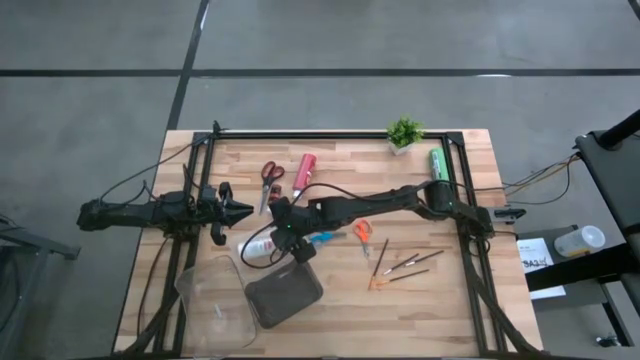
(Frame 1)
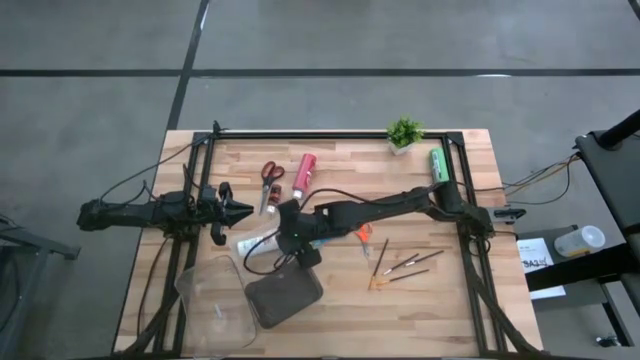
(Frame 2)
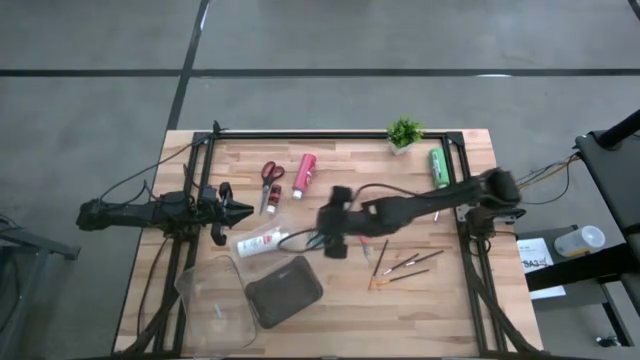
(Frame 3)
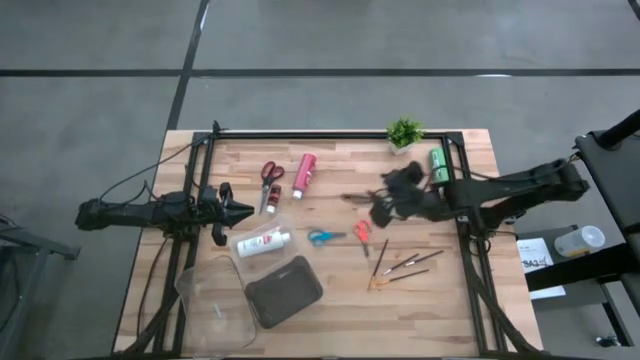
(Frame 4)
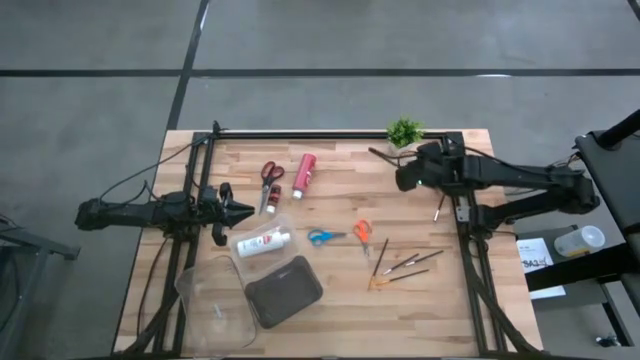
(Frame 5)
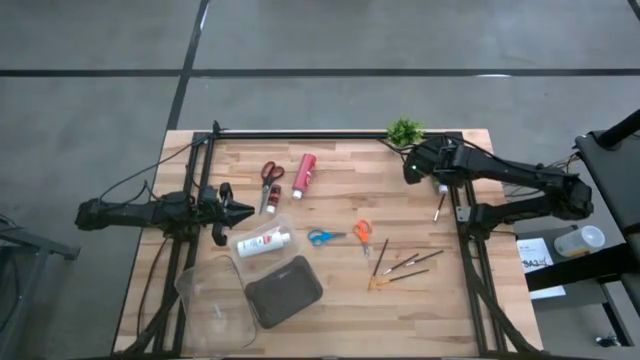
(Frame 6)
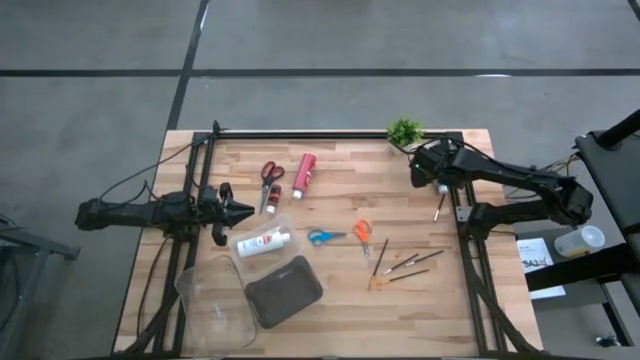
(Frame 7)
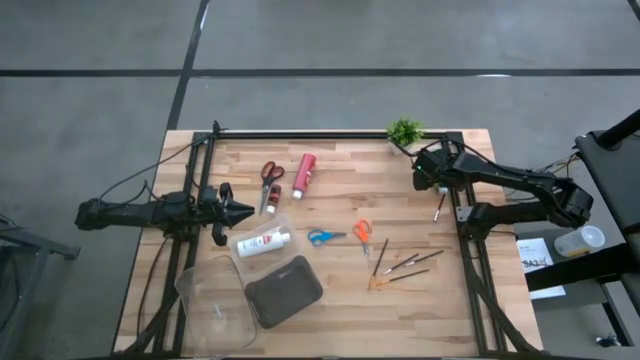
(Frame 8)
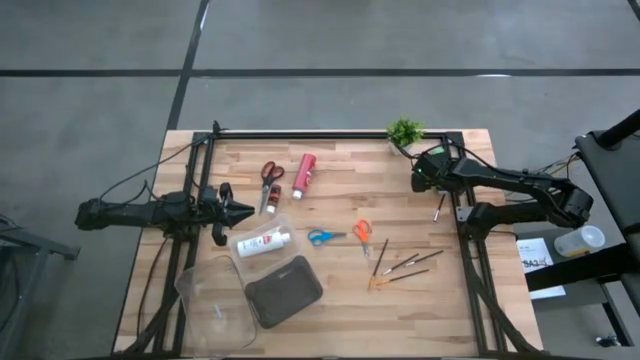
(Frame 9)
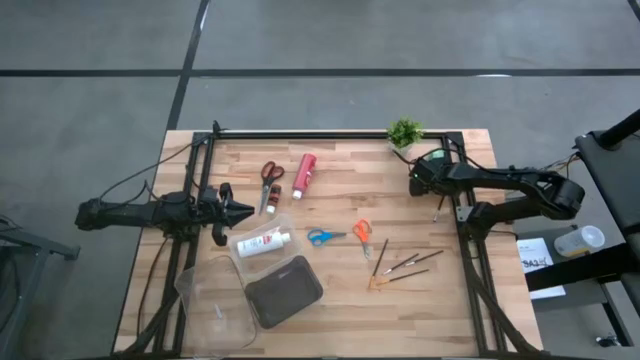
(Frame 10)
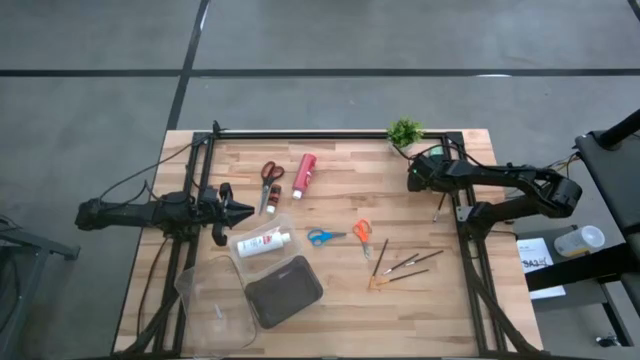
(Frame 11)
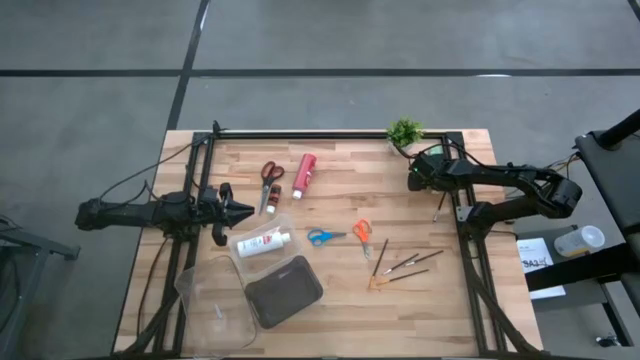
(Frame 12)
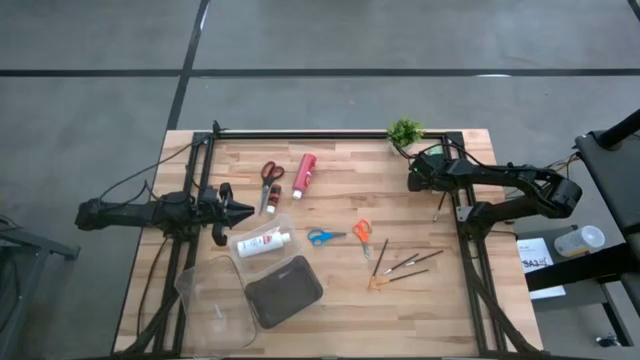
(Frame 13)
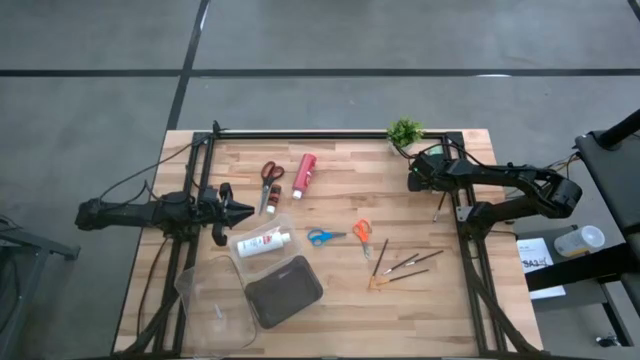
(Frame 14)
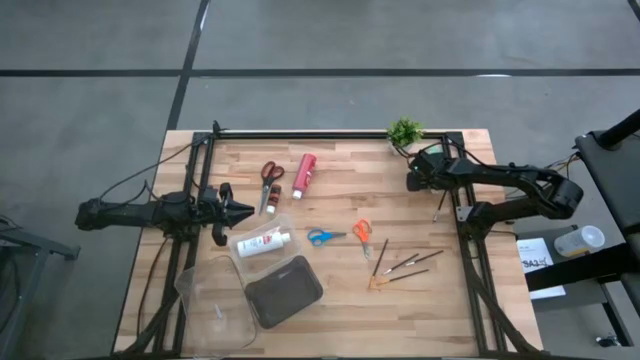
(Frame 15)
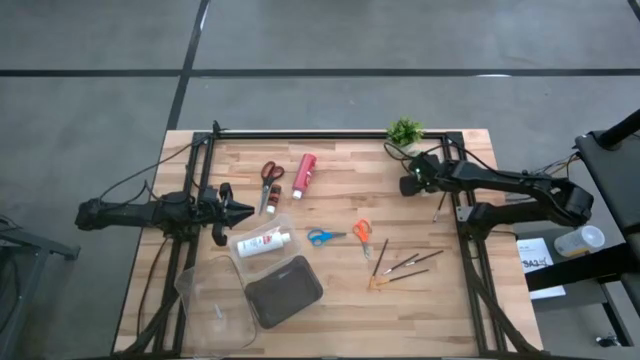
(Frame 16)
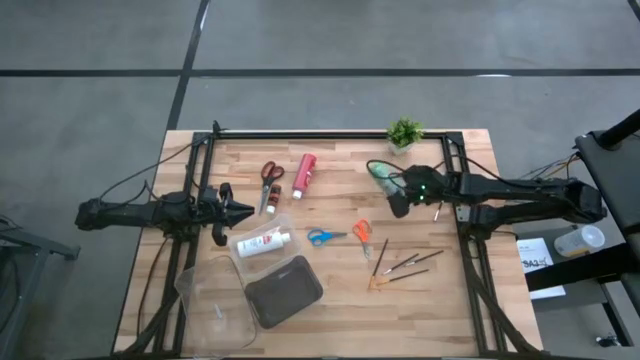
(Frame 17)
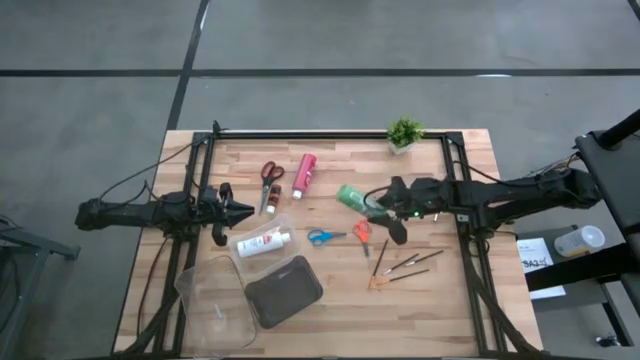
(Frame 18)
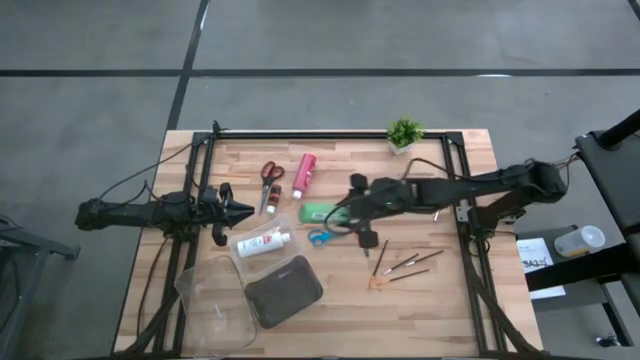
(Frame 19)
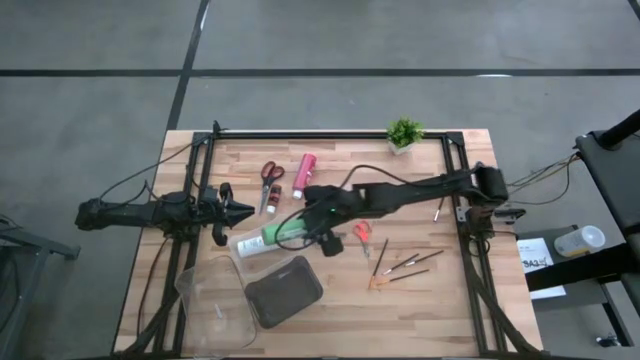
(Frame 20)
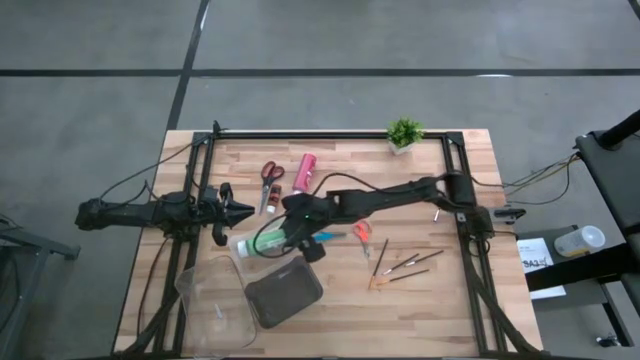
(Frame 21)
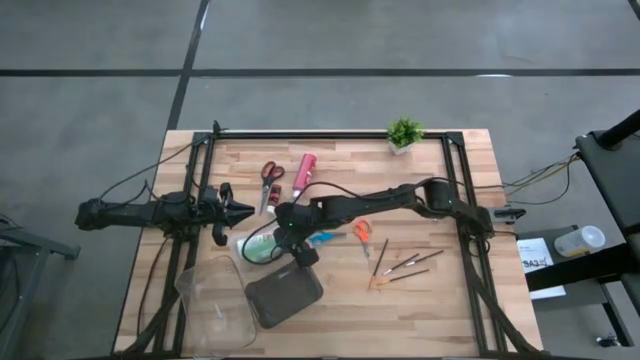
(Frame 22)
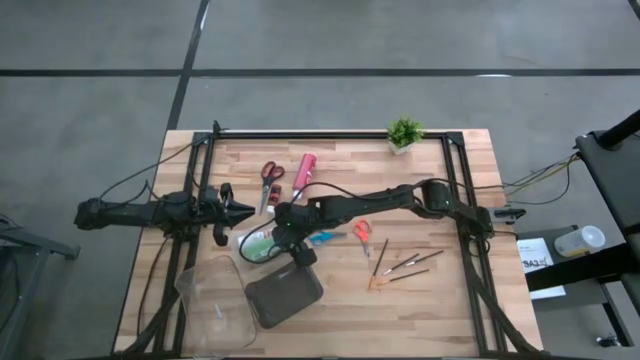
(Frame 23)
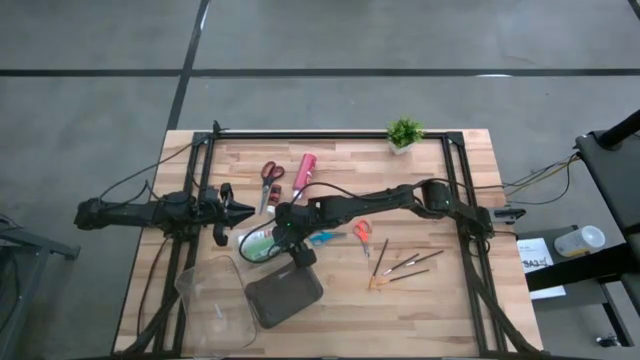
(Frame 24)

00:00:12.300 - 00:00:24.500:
Task: Pick & Place Paint Supplies
Put the green paint bottle into the top transparent bin

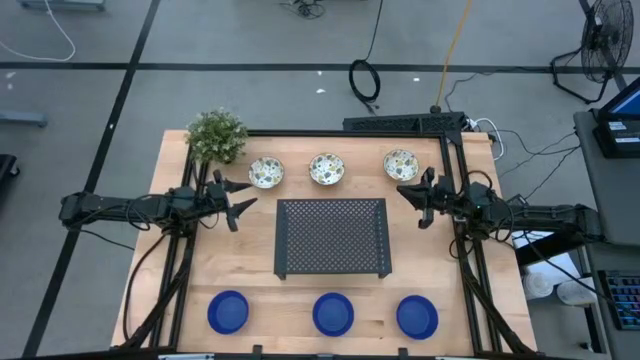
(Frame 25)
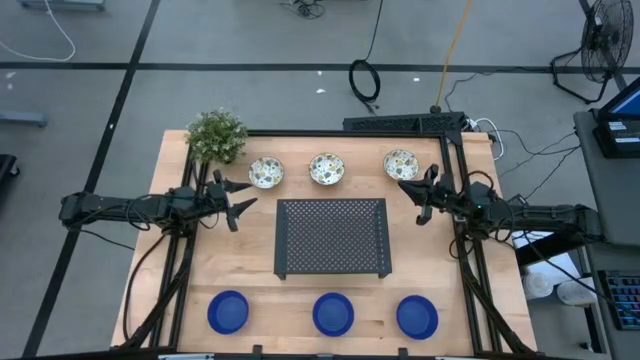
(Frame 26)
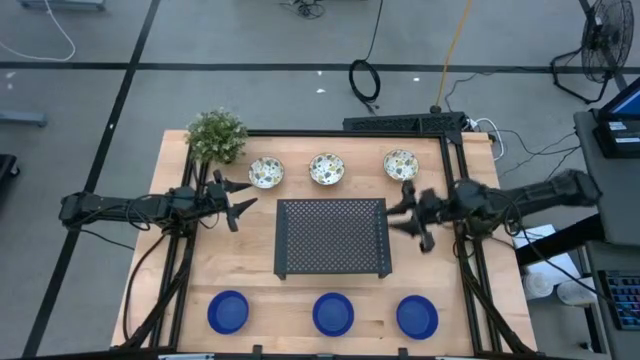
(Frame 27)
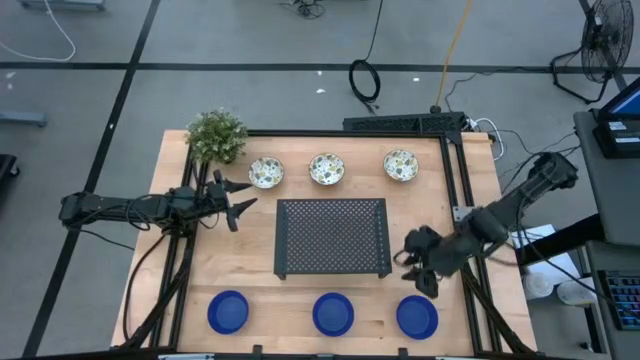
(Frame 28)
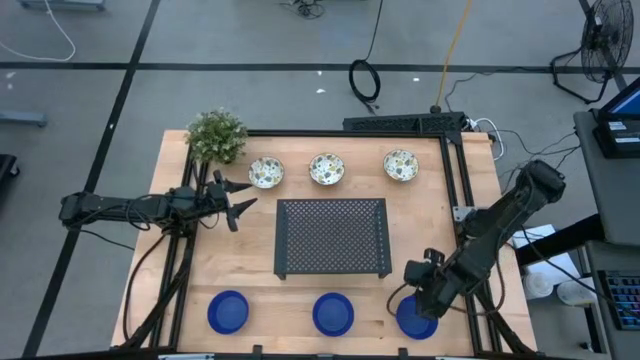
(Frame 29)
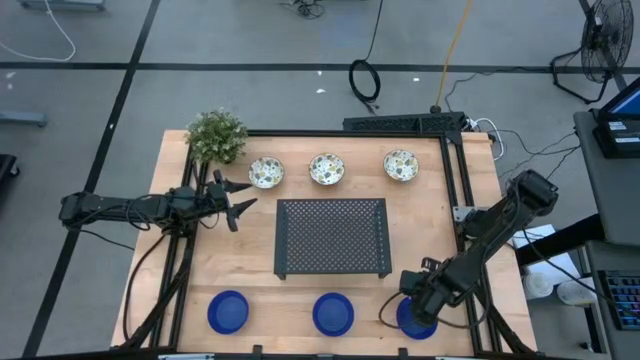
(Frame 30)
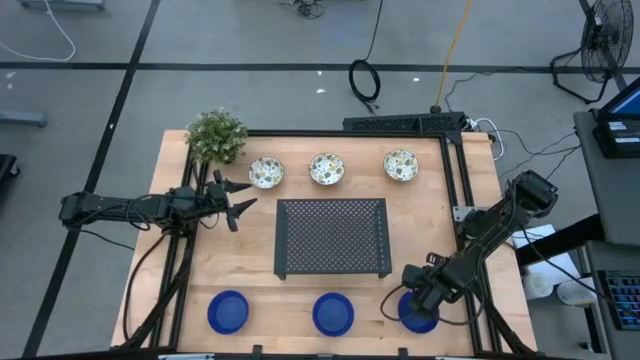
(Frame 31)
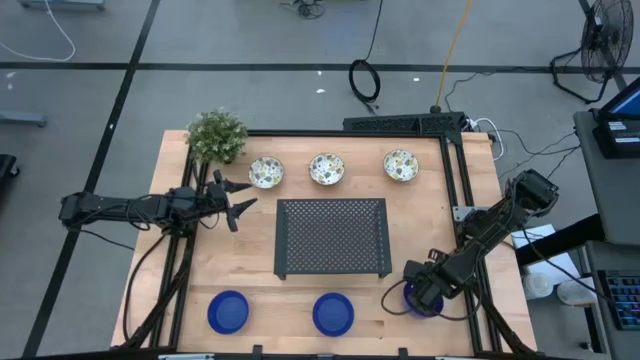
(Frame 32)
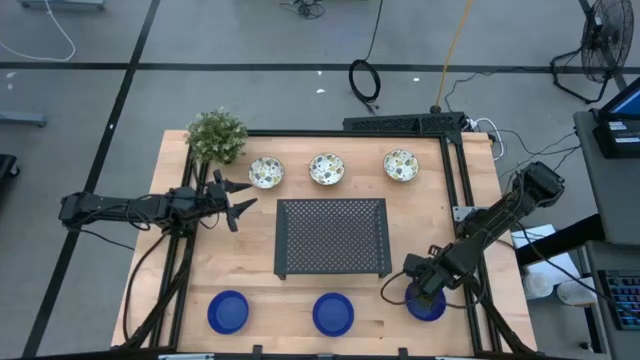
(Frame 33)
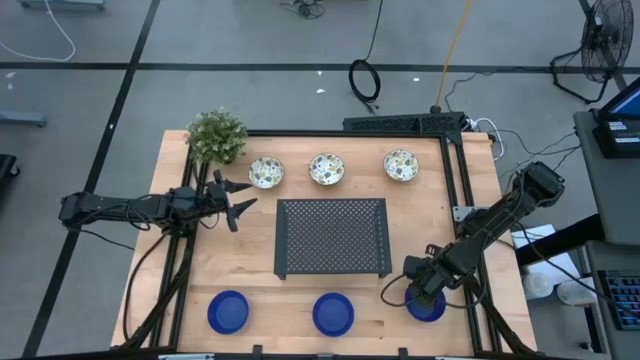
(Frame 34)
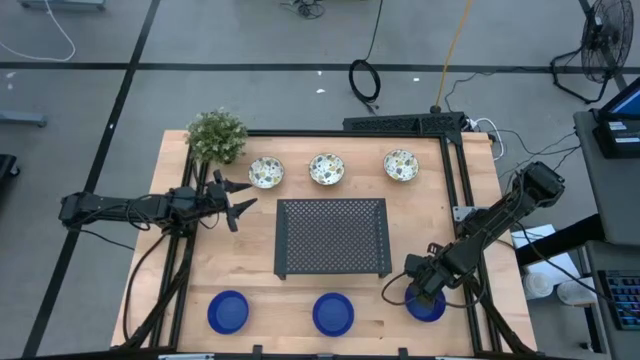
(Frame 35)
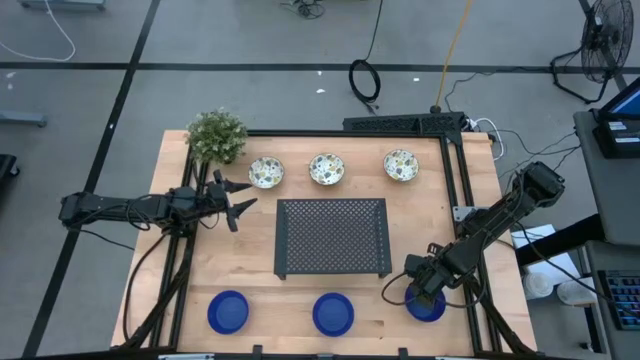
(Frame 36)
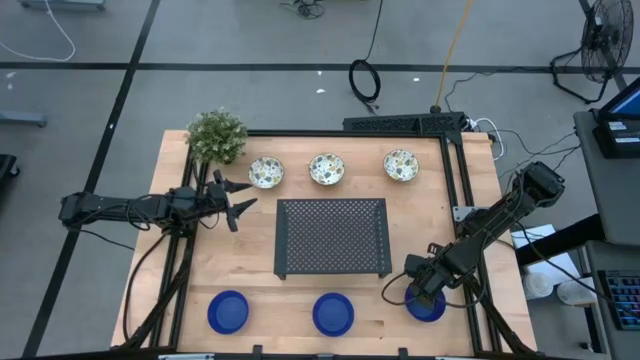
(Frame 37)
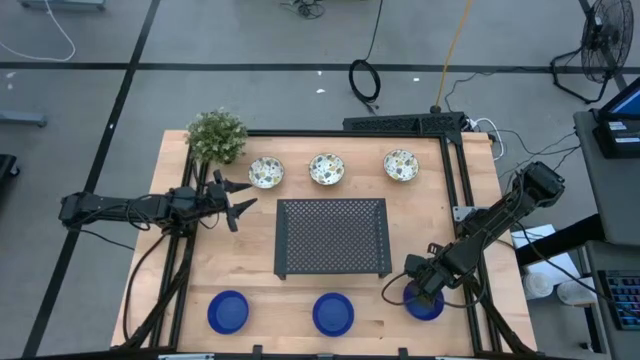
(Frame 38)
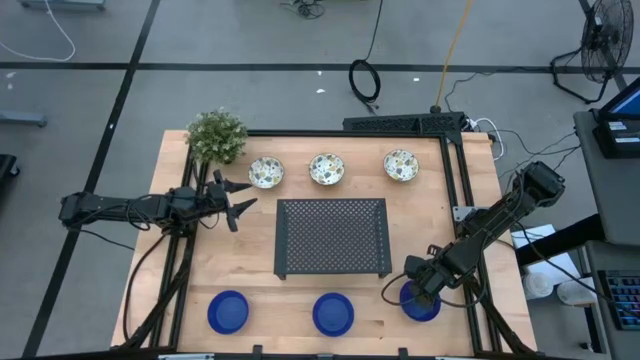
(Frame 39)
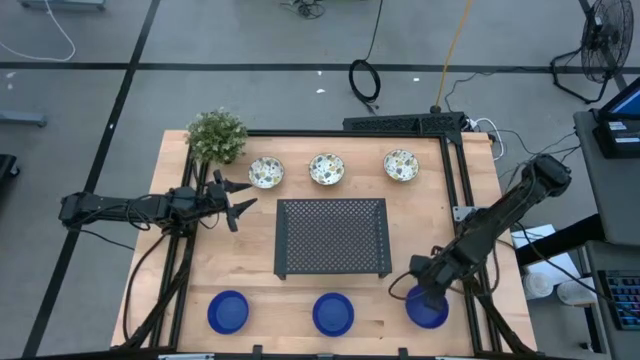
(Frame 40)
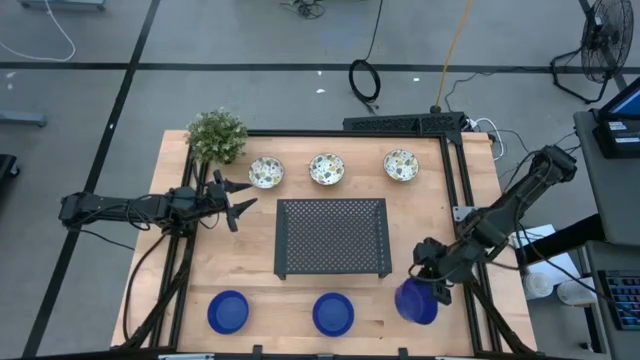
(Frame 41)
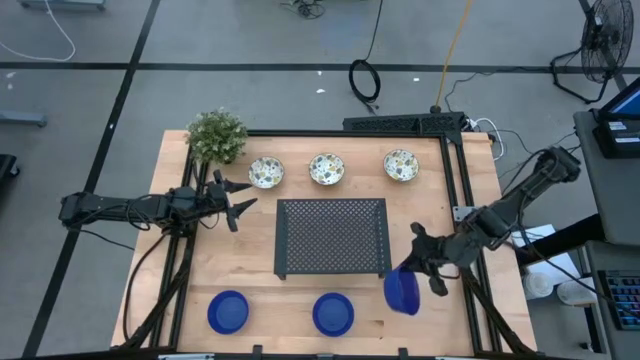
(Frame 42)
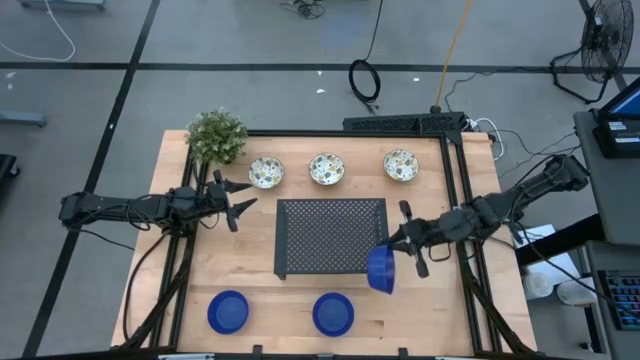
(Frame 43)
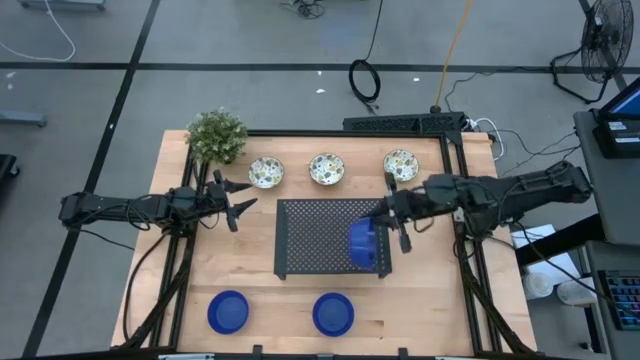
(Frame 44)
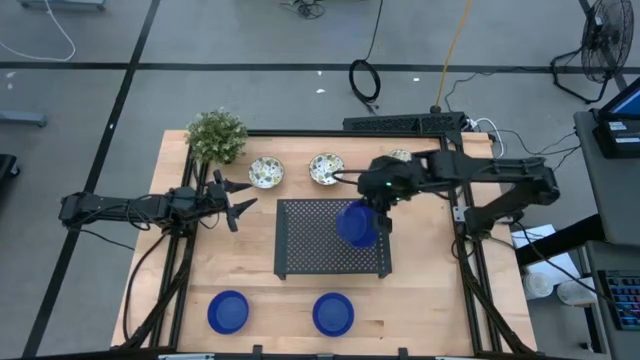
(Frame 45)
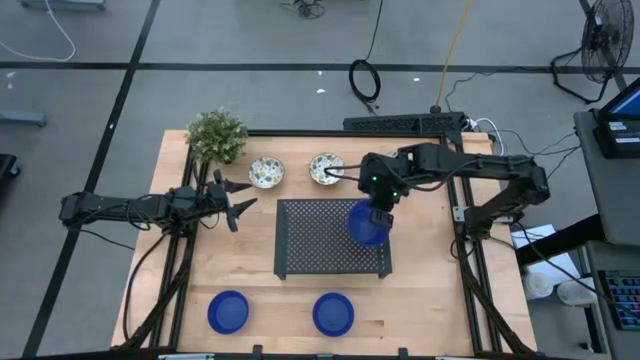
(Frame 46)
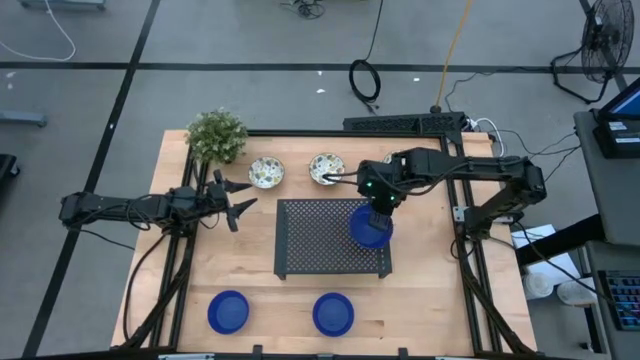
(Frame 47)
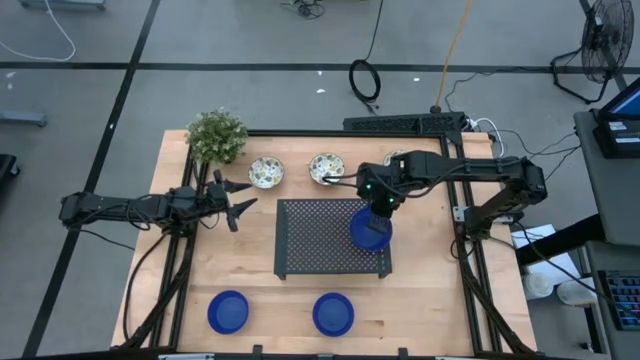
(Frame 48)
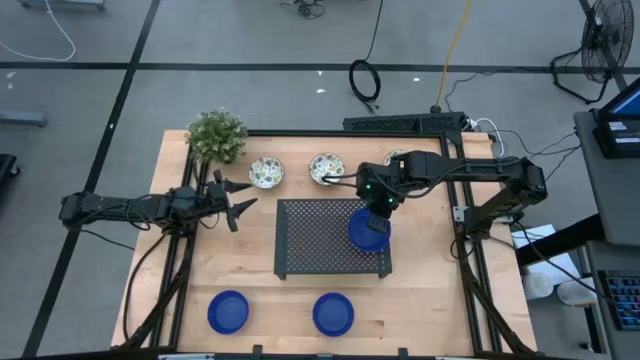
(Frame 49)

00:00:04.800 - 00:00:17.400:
Task: Pick & Place Mini bowls
Put the right blue bowl on the shelf
